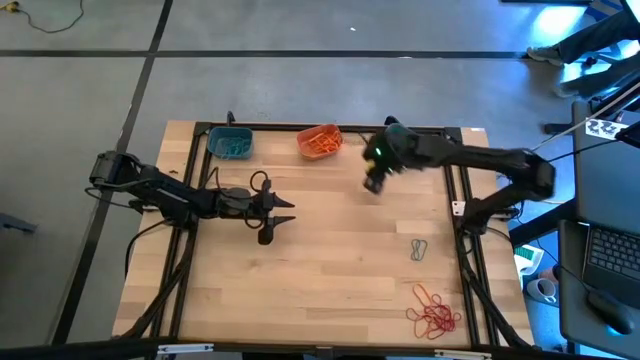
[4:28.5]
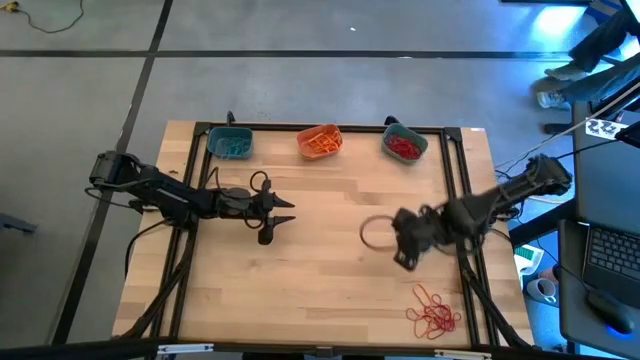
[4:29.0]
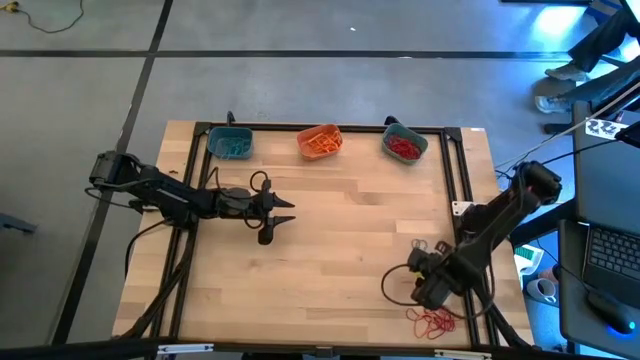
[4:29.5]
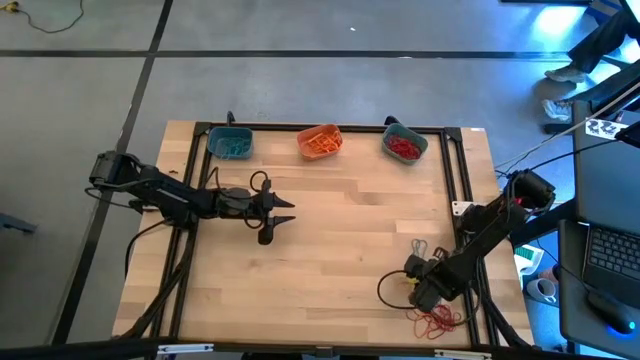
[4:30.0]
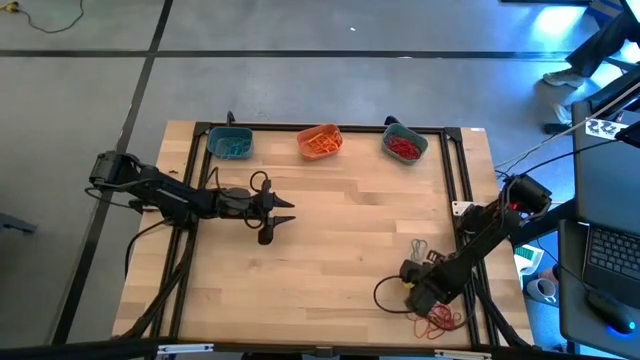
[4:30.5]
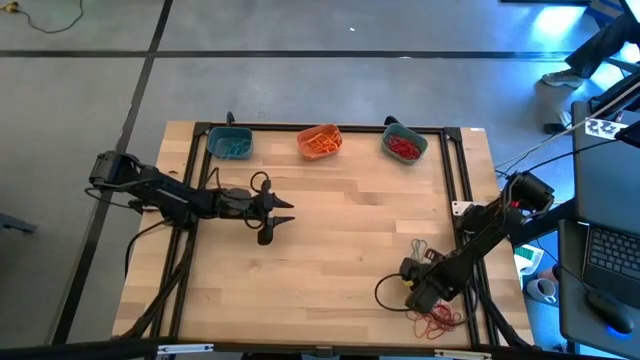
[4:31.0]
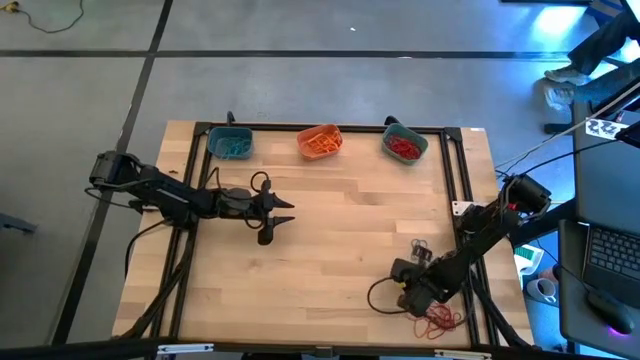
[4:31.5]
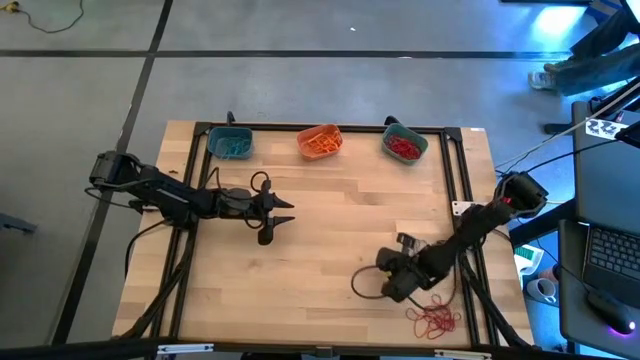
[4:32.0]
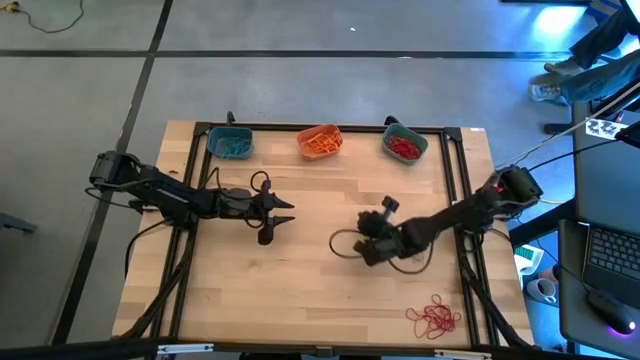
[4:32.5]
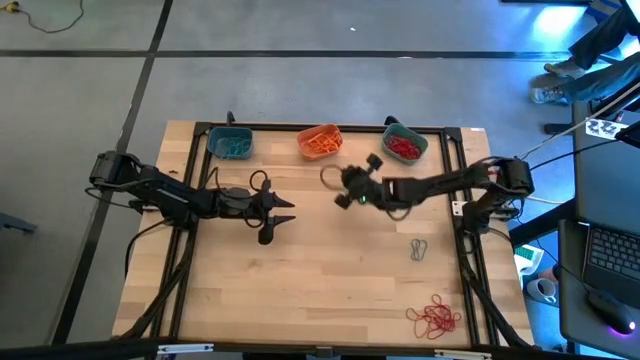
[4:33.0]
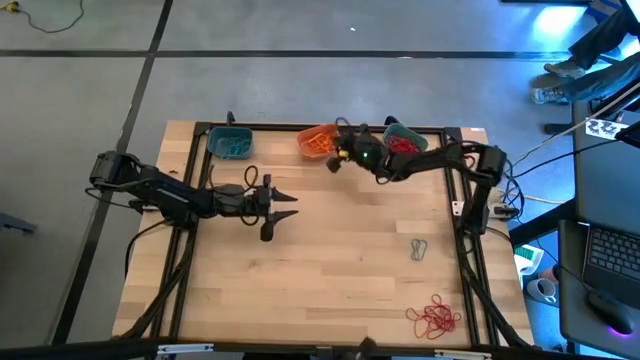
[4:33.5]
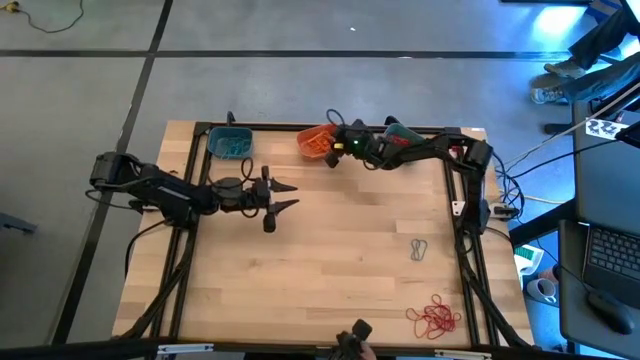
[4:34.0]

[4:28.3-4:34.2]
Task: Sort rubber bands into baskets
Put the orange rubber band into the orange bin

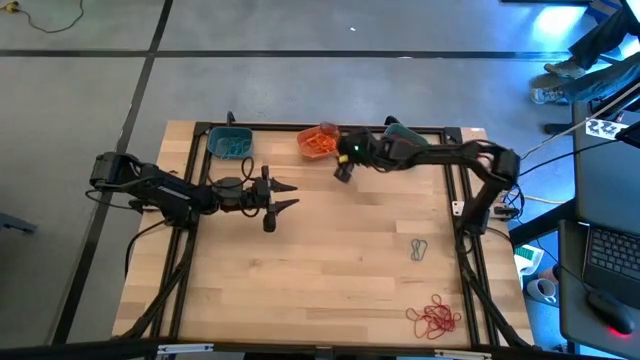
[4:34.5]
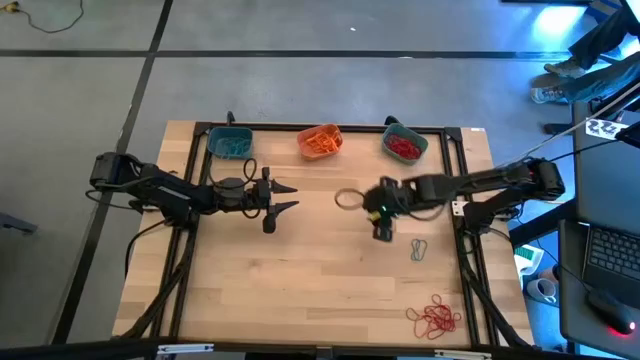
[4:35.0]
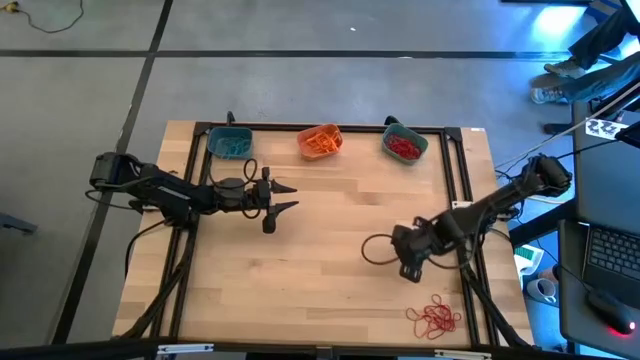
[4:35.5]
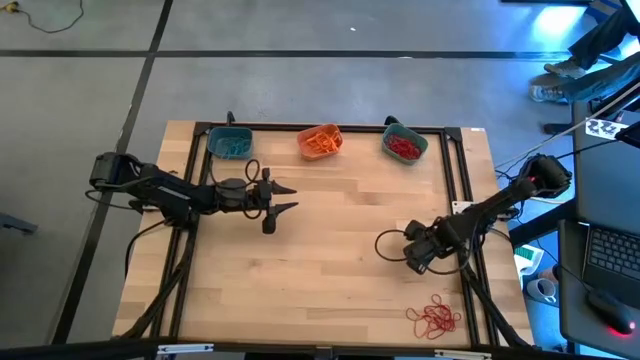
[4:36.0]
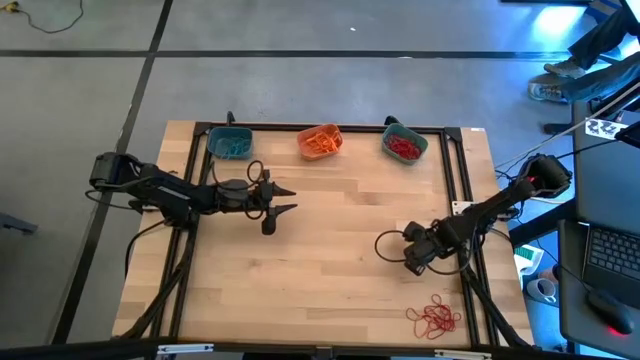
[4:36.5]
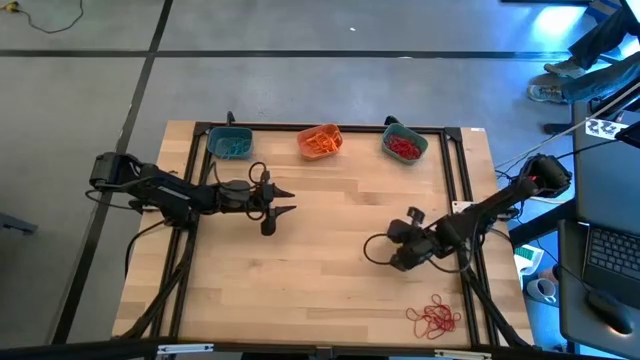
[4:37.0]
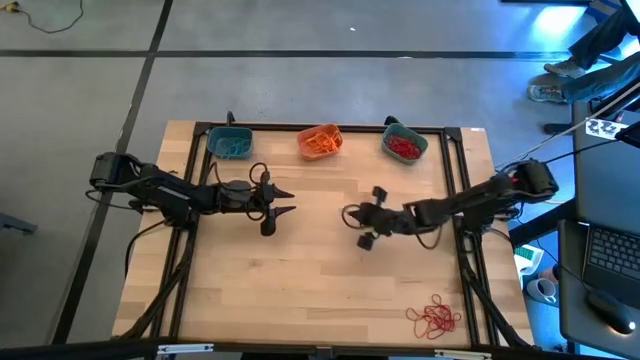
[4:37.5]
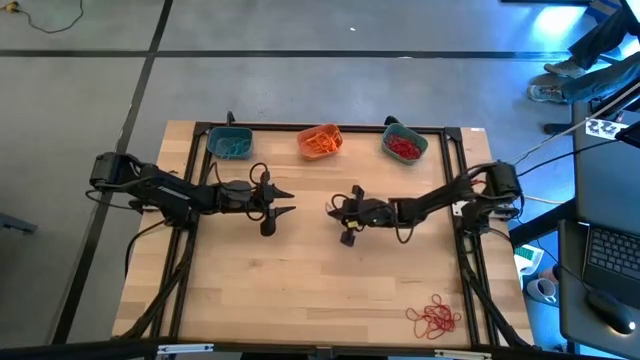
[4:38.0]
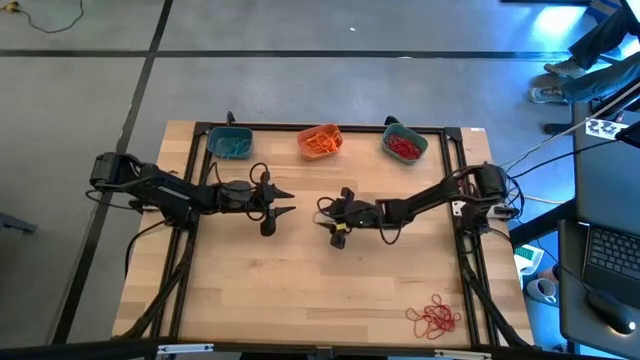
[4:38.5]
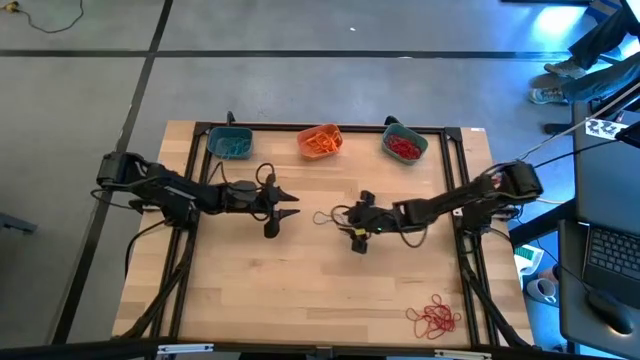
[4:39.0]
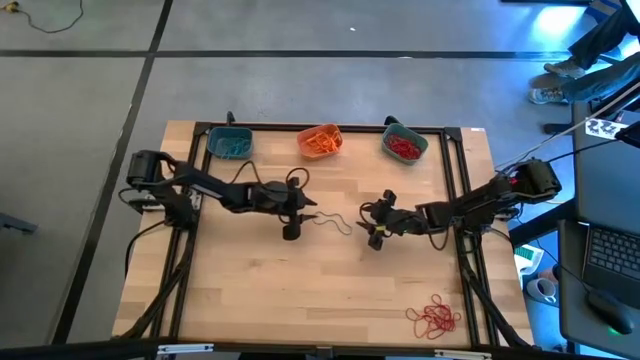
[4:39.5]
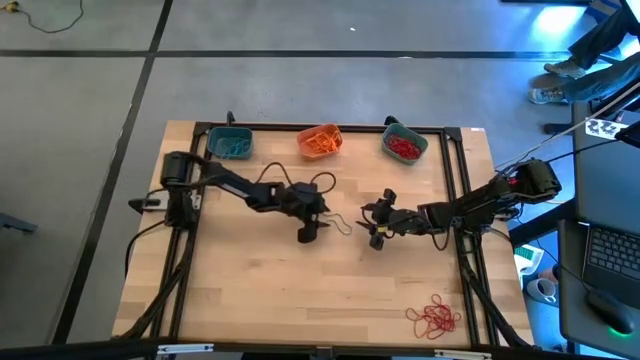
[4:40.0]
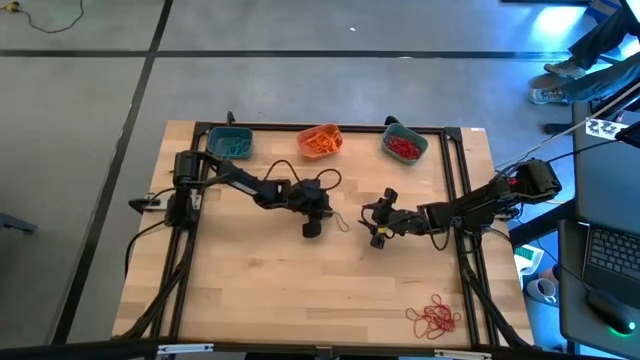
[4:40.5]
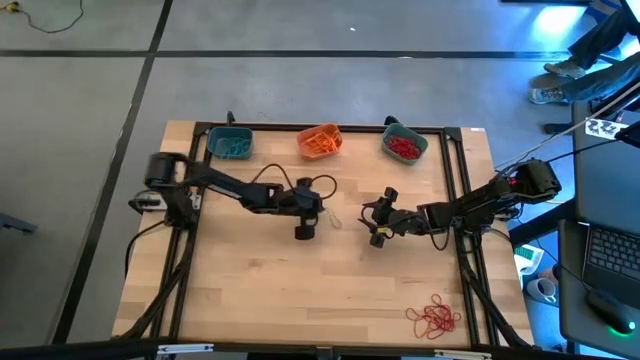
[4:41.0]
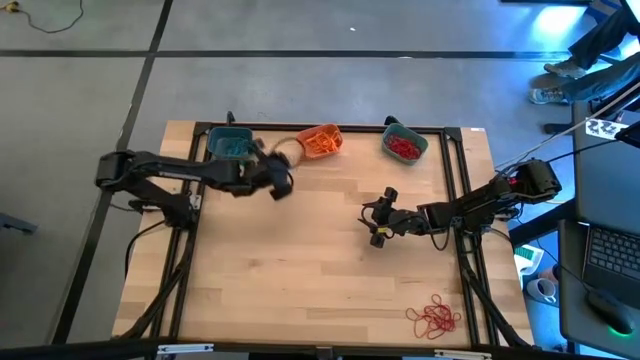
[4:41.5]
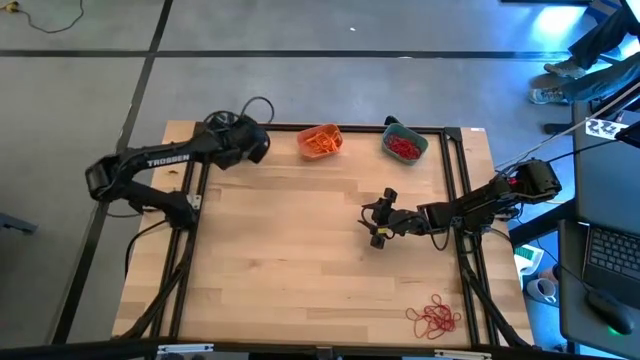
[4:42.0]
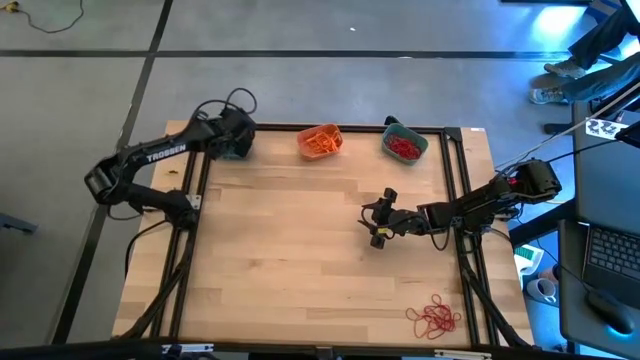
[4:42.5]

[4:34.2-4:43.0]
Put the blue rubber band into the blue bin

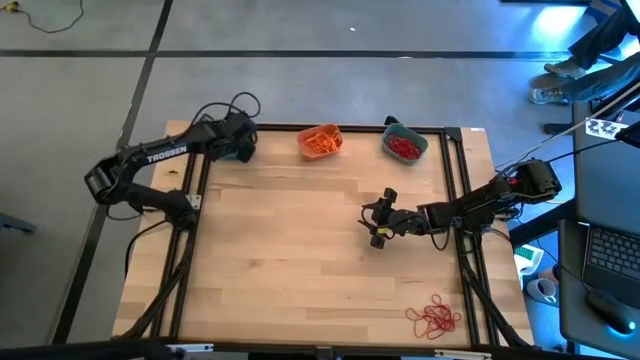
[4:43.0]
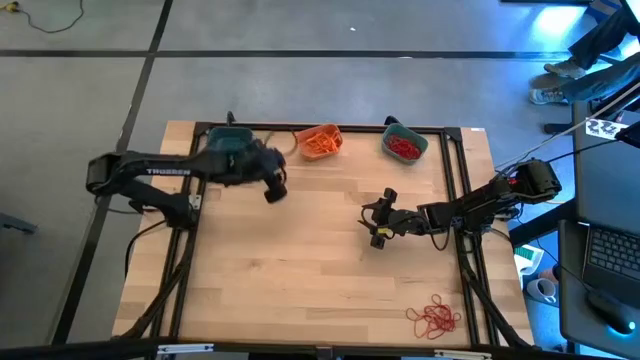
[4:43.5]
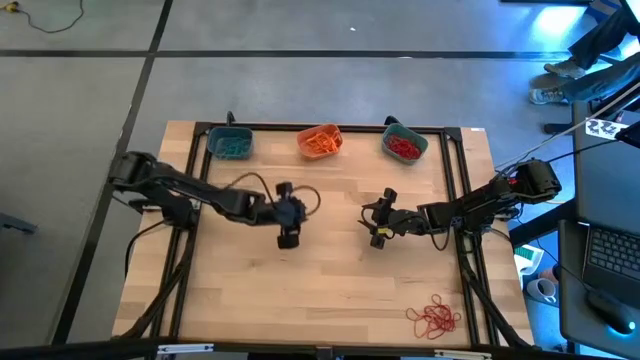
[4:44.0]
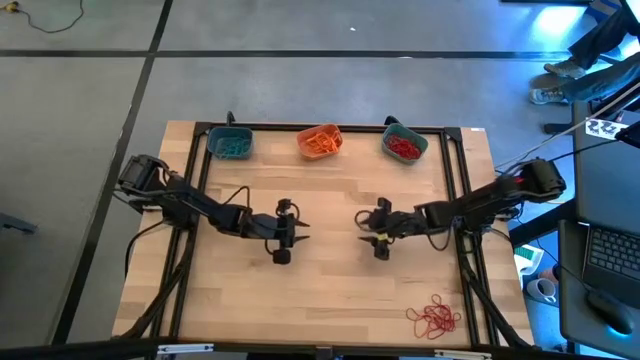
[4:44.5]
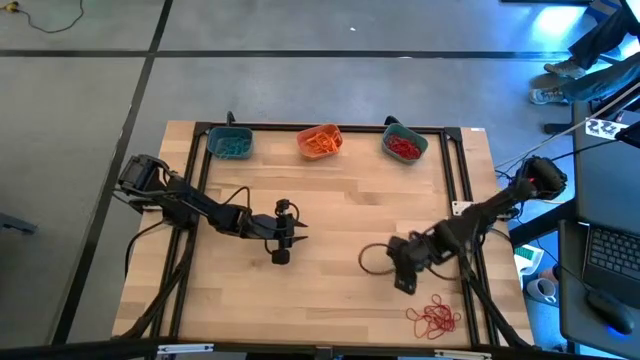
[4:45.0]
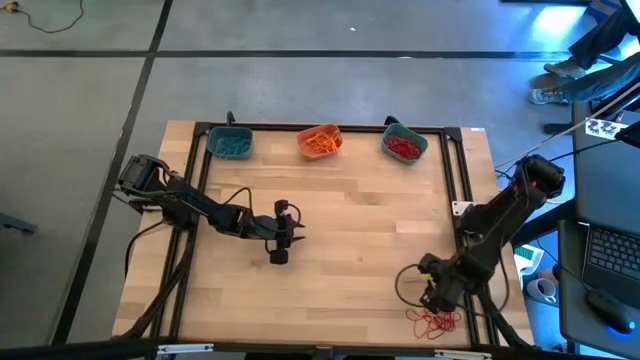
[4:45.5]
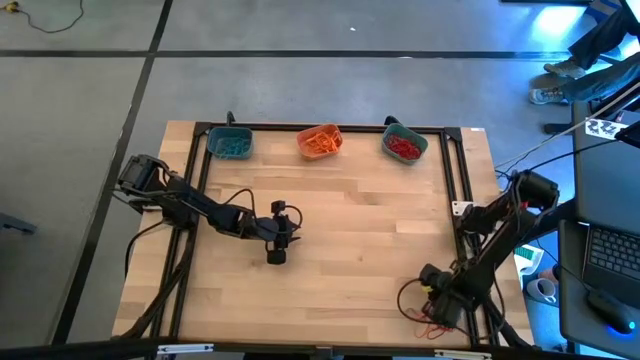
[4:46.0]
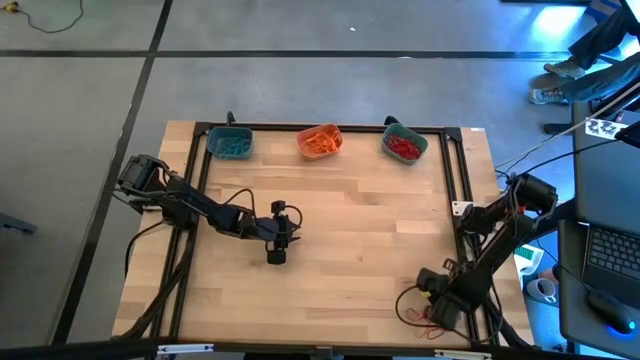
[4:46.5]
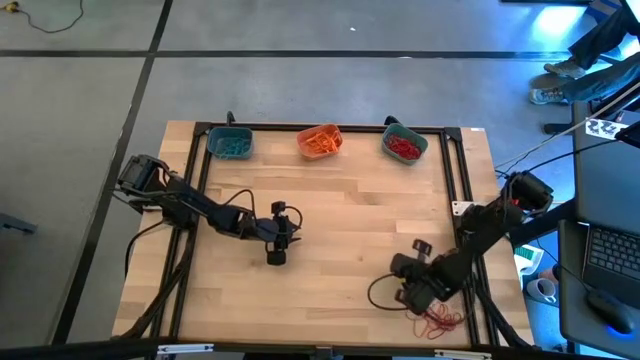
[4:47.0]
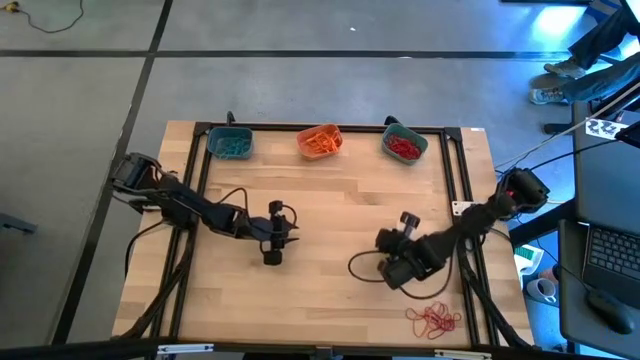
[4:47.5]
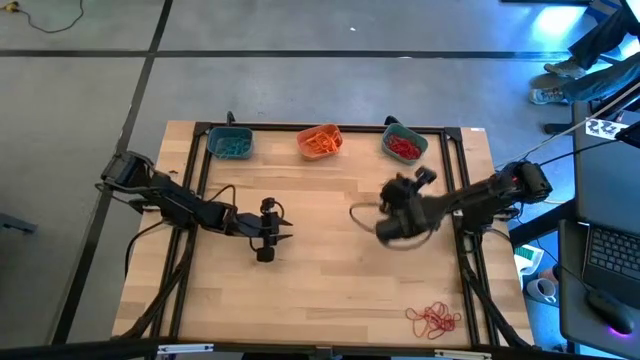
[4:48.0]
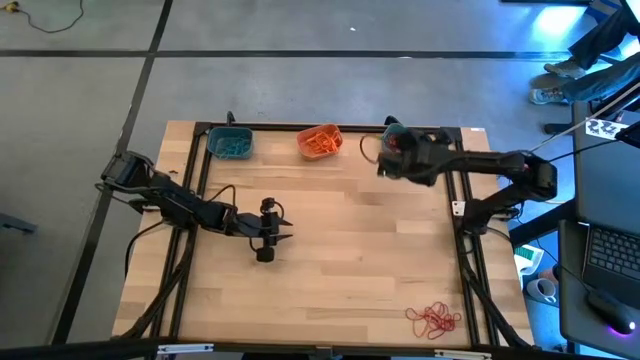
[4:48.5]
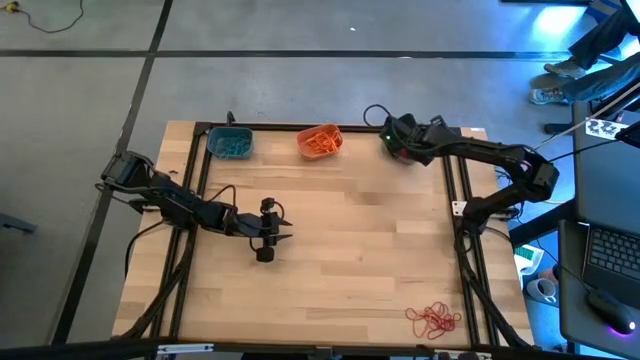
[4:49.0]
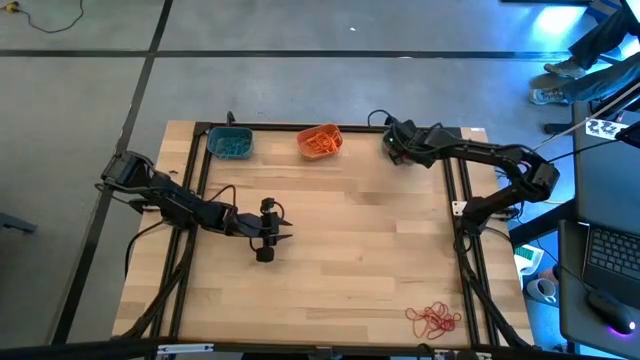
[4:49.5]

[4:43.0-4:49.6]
Put the red rubber band into the green bin
